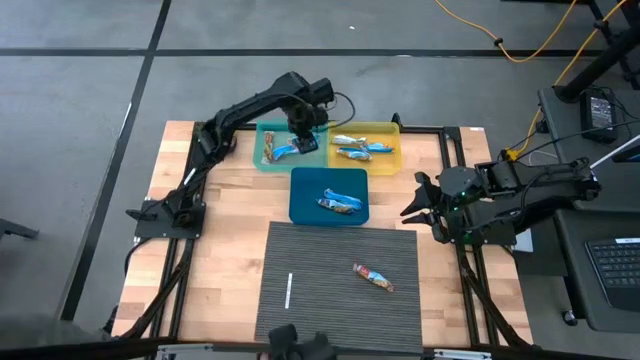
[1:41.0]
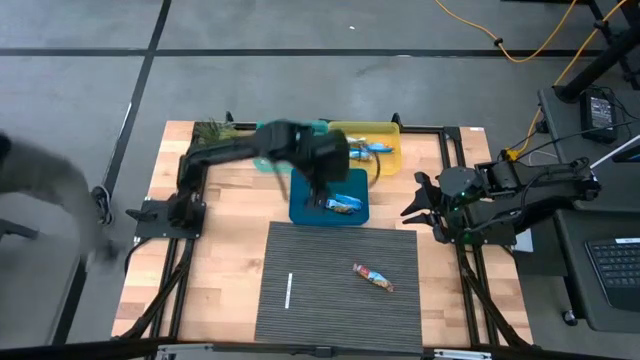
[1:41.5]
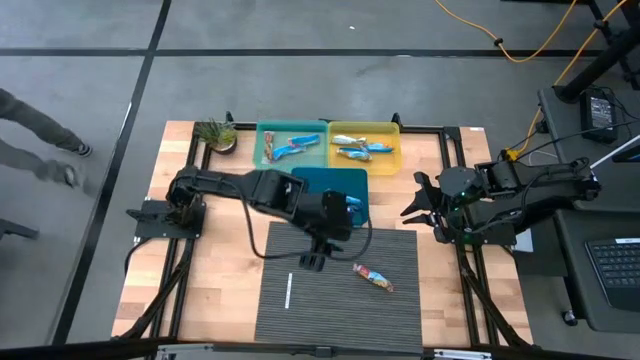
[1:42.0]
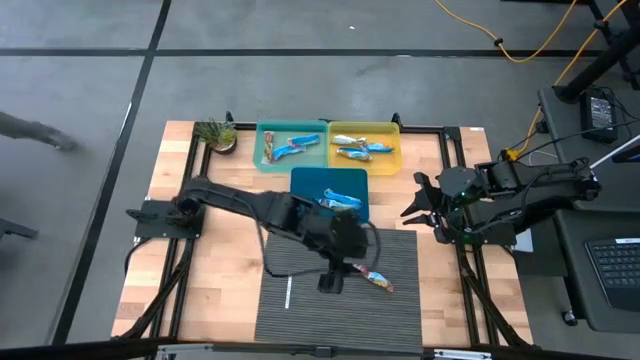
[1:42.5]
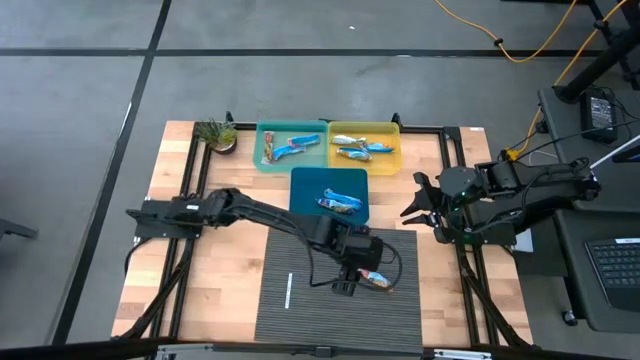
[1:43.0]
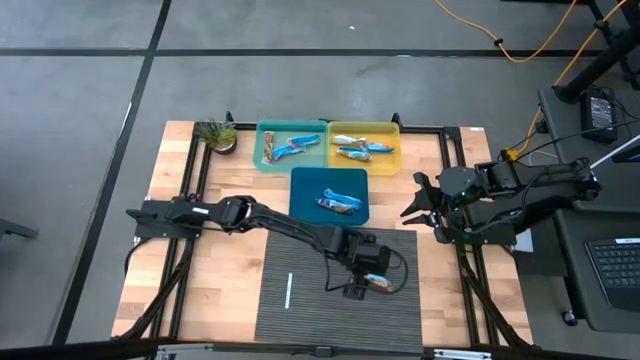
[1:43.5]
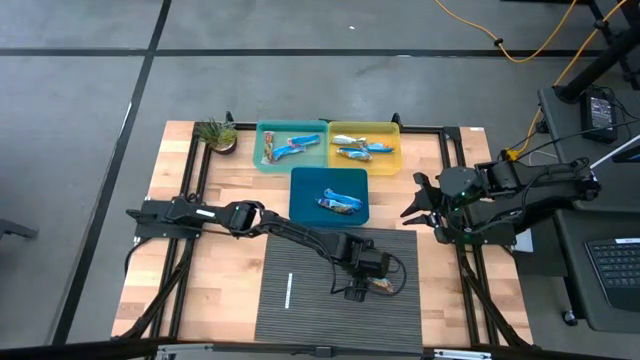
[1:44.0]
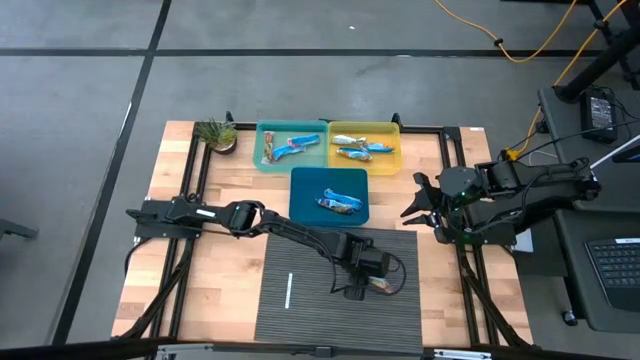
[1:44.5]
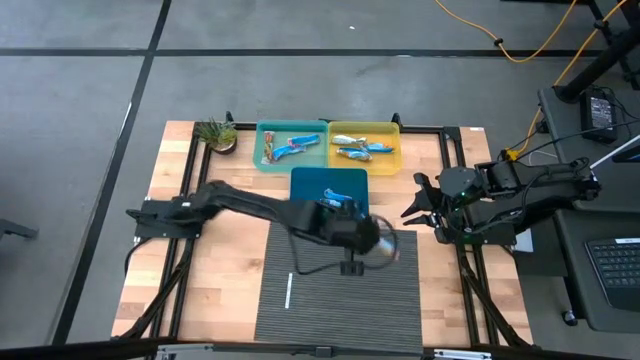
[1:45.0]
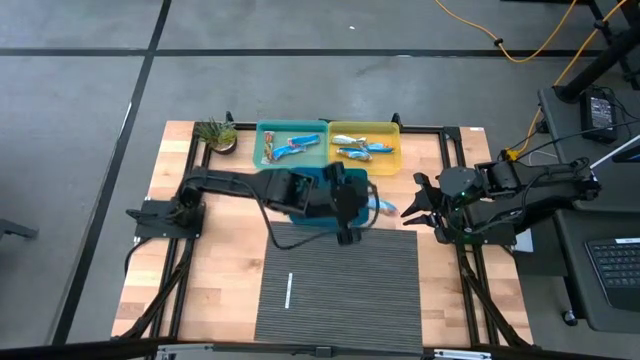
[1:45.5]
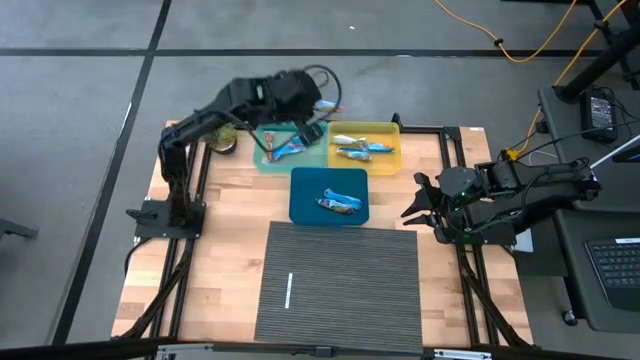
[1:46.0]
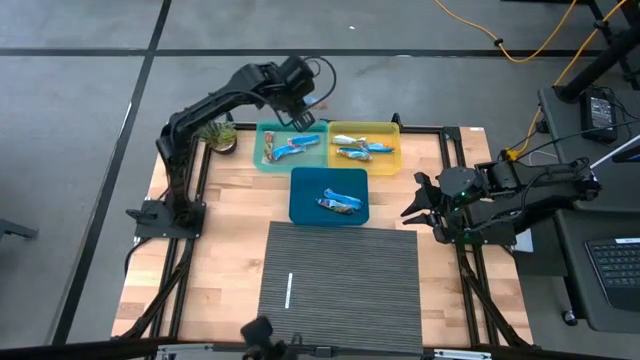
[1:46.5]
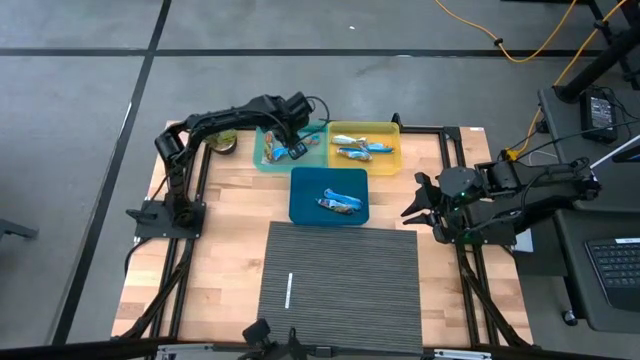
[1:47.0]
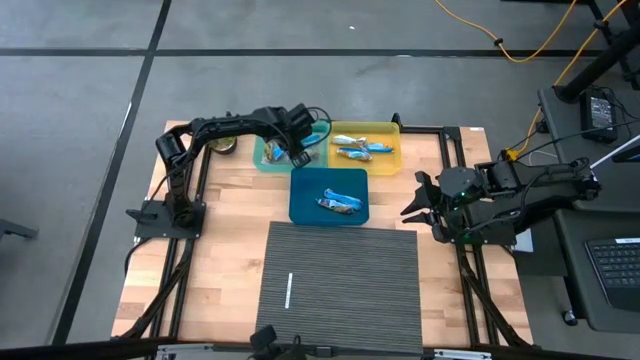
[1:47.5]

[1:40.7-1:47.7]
Task: Pick and place Granola Bars by type
Put the red granola bar into the green bin

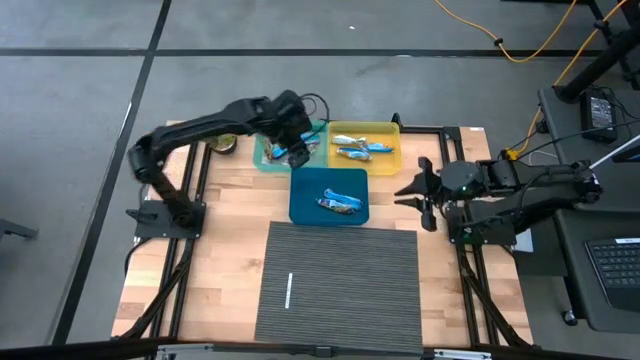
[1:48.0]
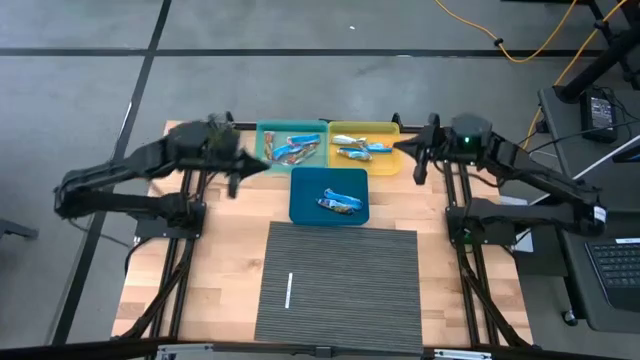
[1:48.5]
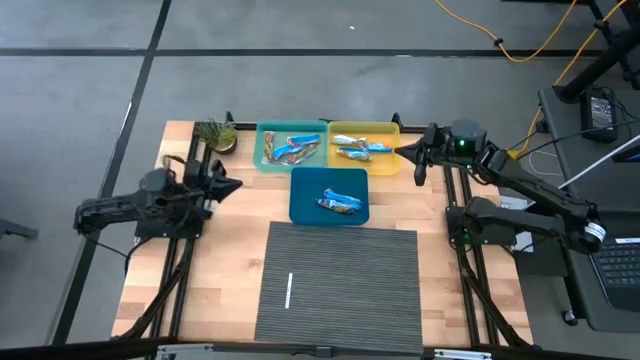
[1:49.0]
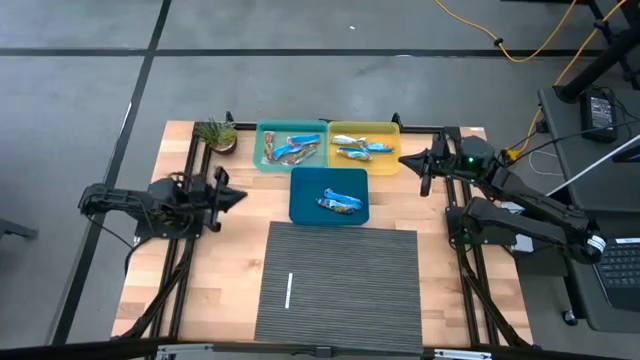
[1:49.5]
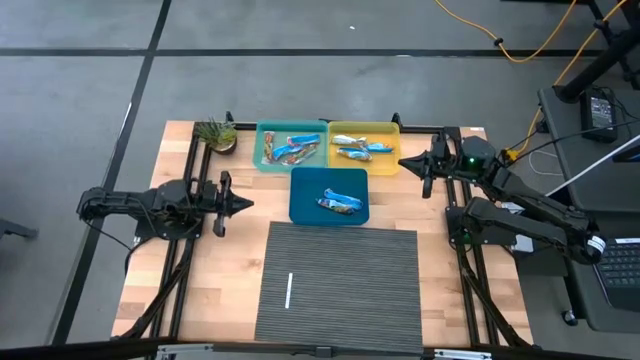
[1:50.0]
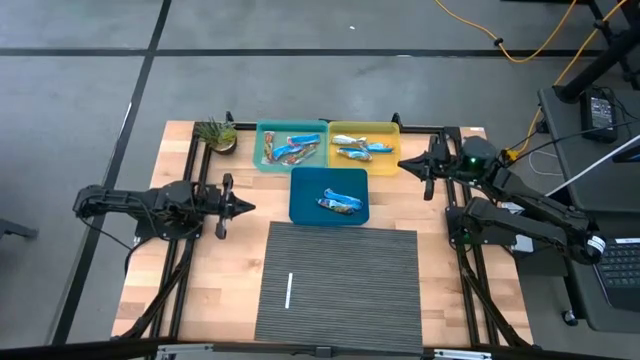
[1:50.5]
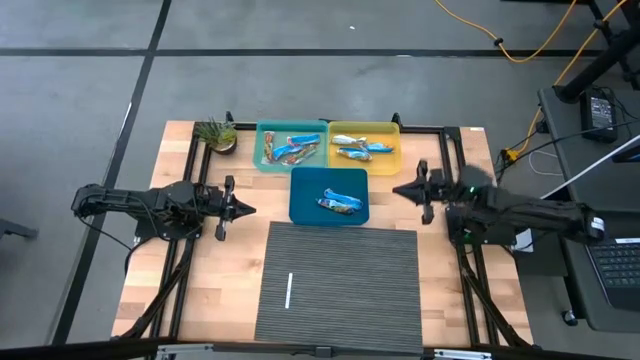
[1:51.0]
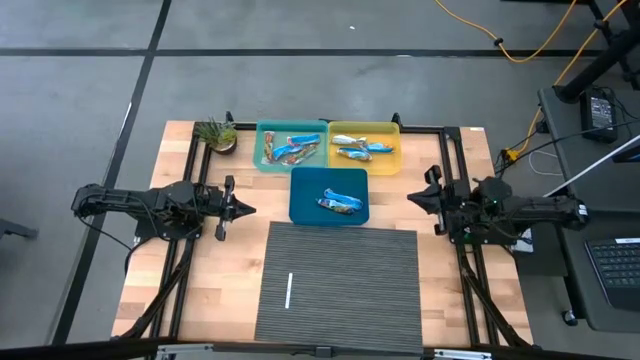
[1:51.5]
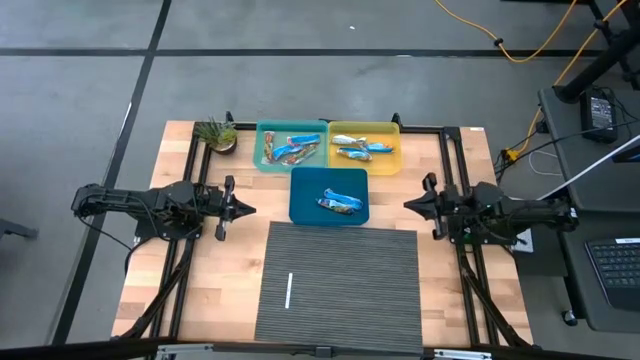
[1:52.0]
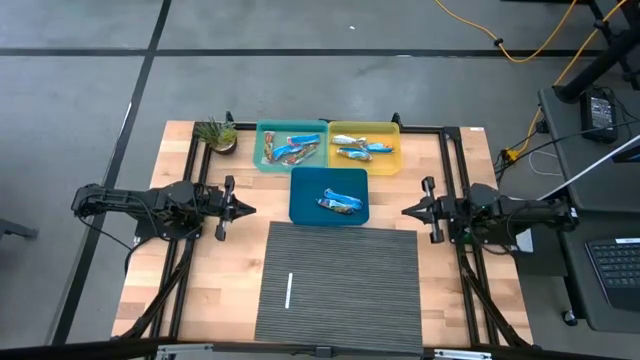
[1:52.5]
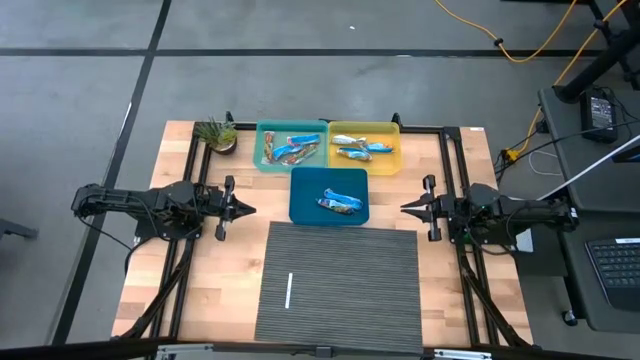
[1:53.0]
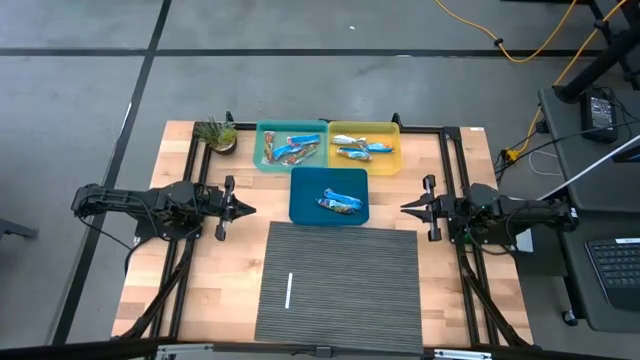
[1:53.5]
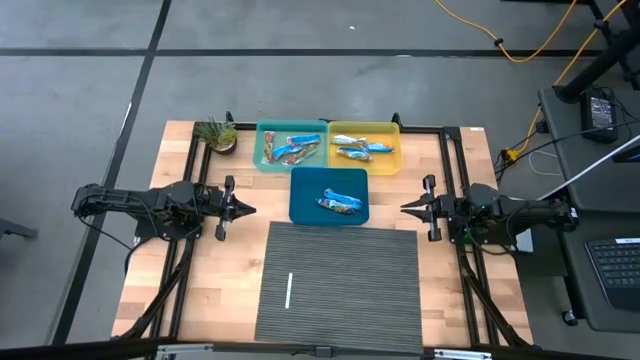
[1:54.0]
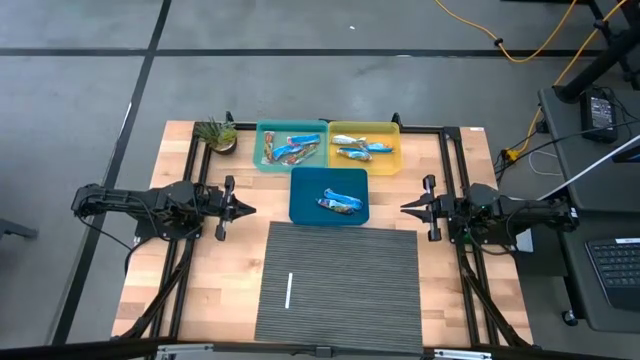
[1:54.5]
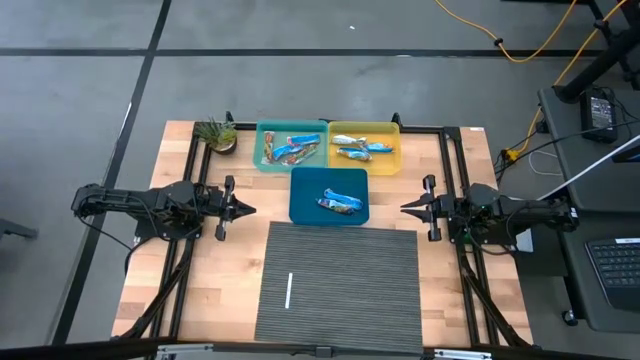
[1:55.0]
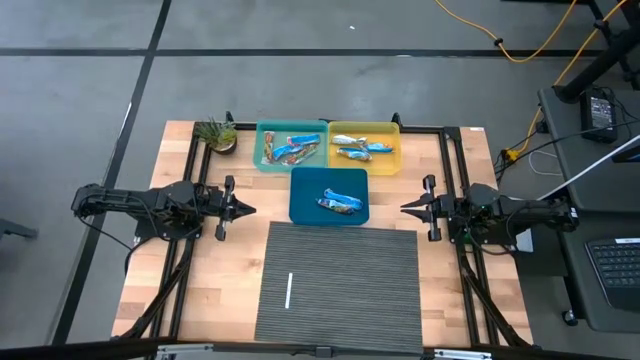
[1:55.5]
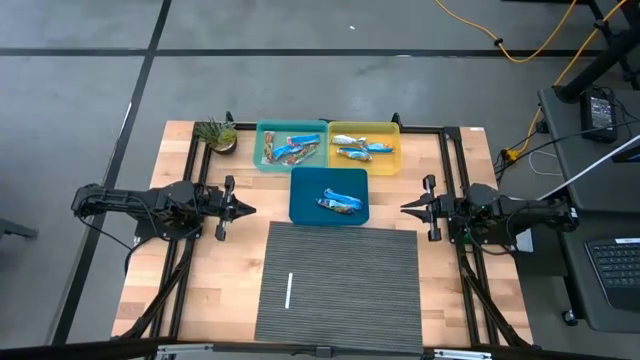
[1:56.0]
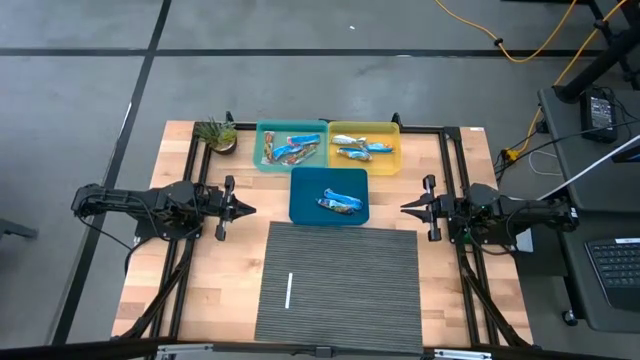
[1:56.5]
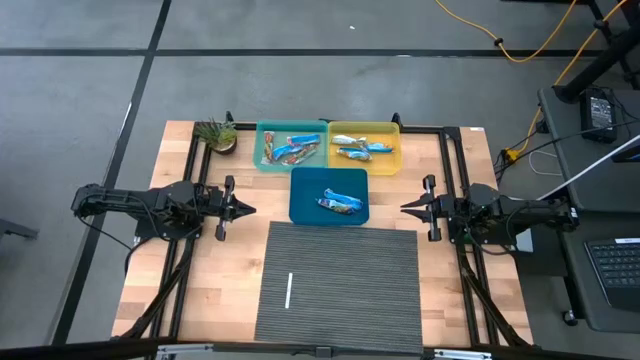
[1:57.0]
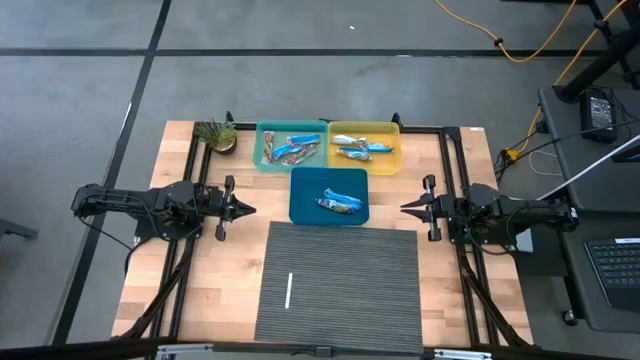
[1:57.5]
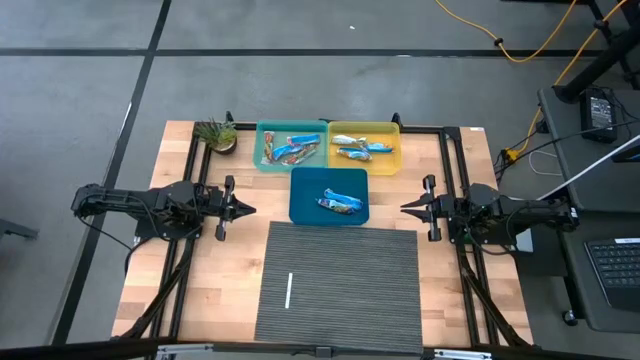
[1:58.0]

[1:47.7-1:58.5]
Return to Home Position

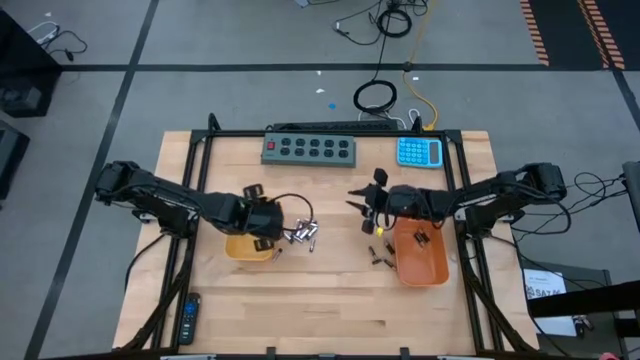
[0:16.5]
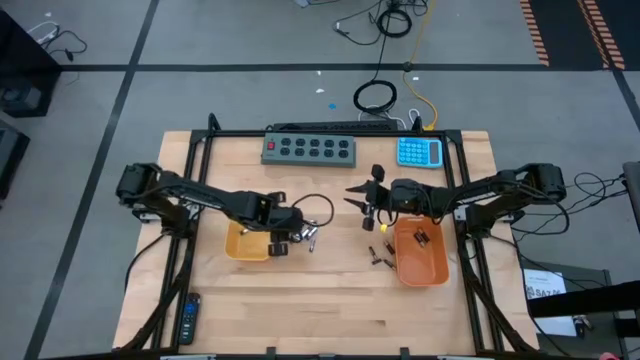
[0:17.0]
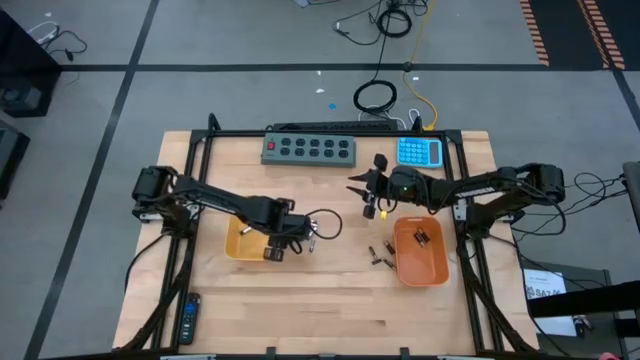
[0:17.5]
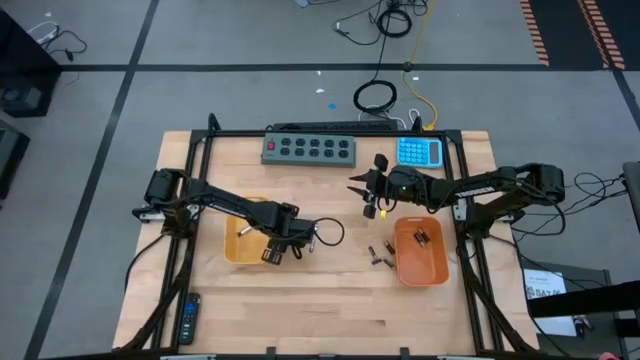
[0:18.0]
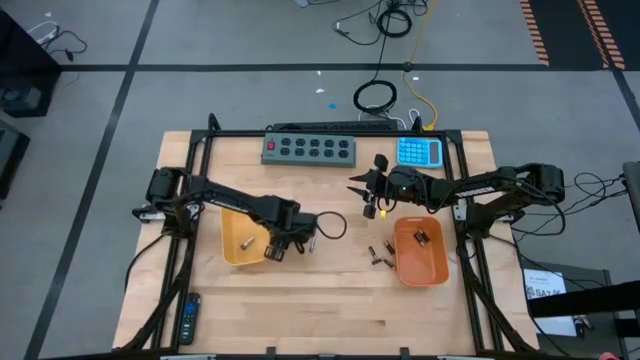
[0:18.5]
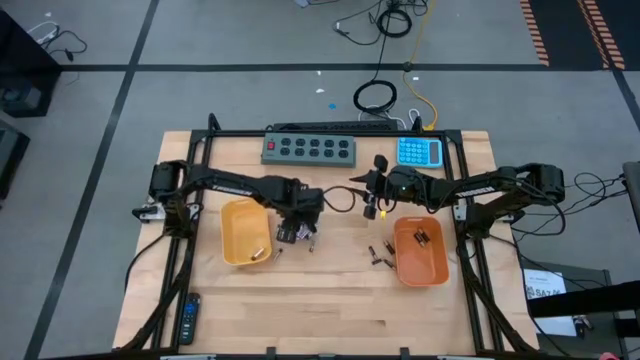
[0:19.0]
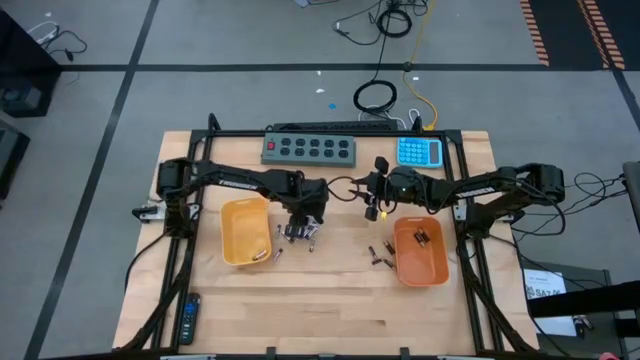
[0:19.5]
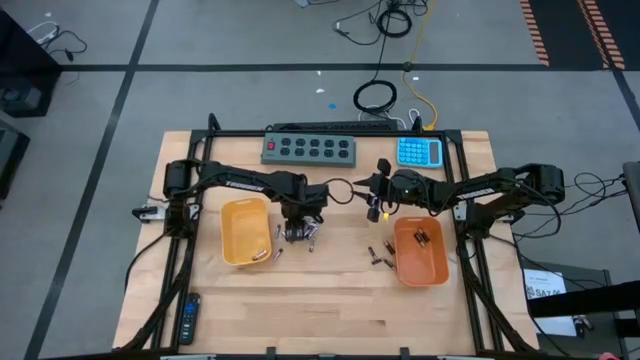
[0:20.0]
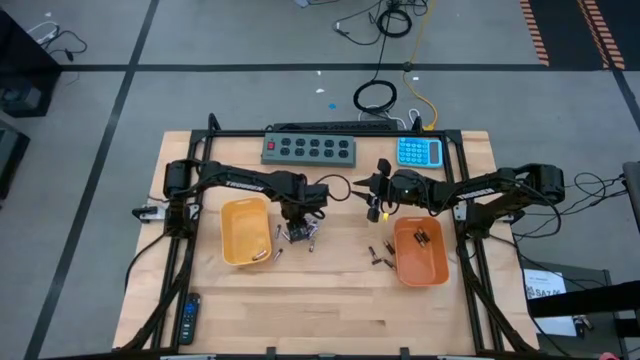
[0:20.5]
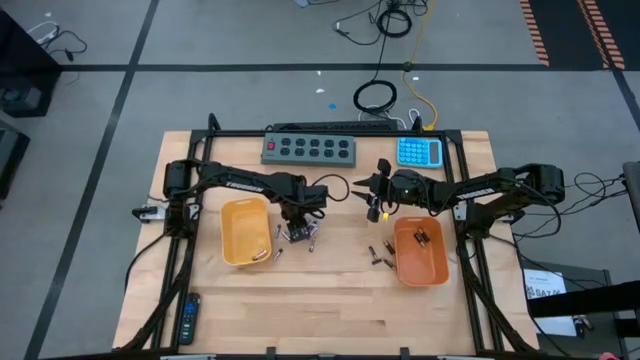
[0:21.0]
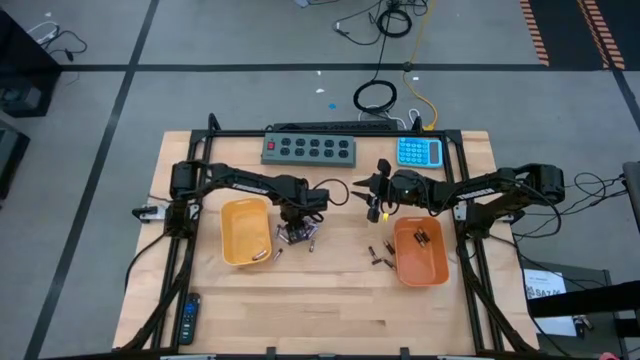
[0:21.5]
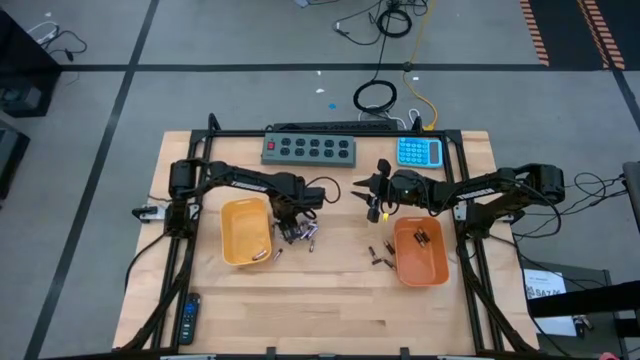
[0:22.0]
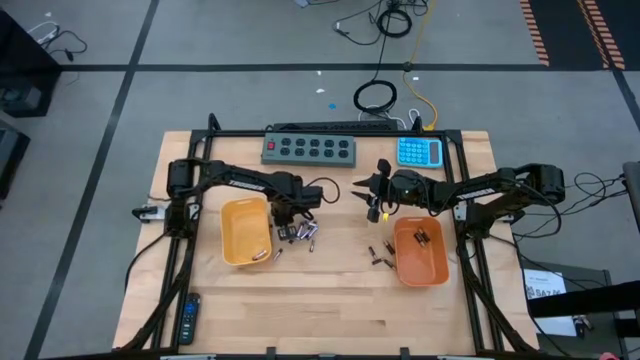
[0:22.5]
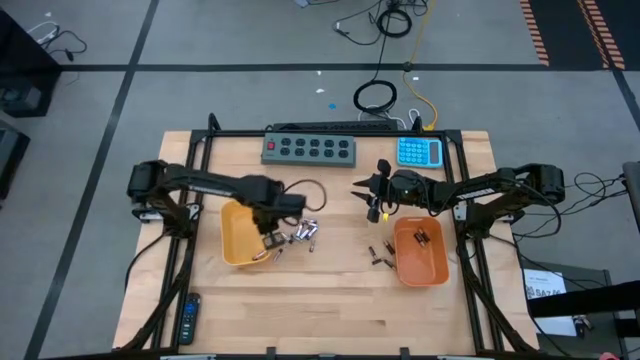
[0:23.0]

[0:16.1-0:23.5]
Task: Sort batteries
Put the silver battery into the yellow bin
